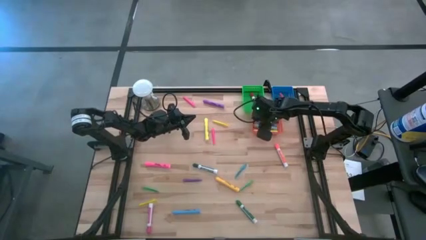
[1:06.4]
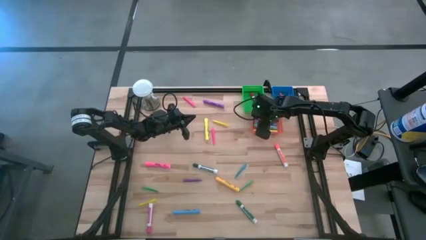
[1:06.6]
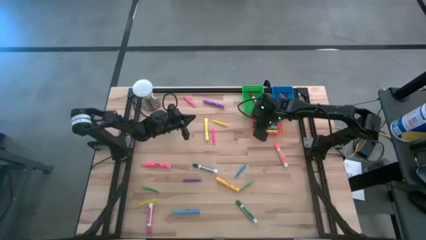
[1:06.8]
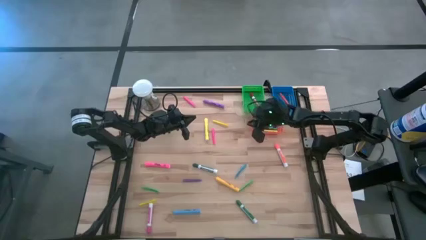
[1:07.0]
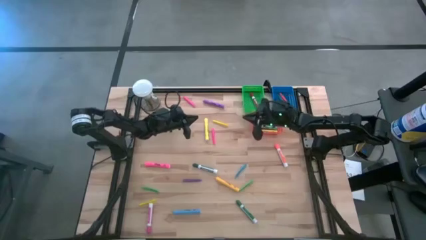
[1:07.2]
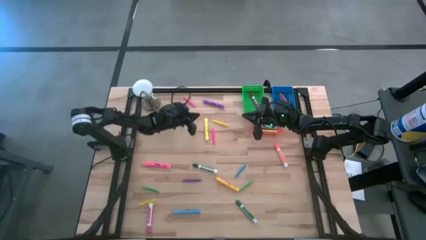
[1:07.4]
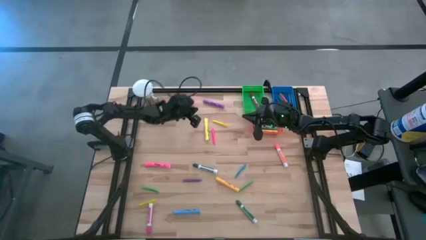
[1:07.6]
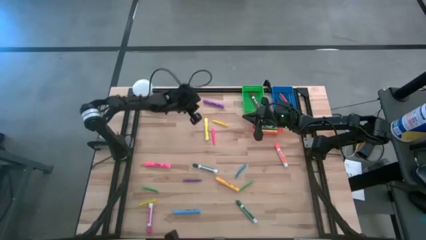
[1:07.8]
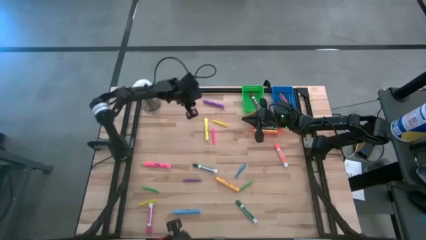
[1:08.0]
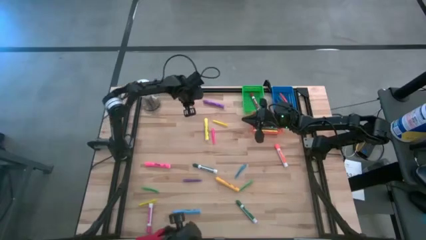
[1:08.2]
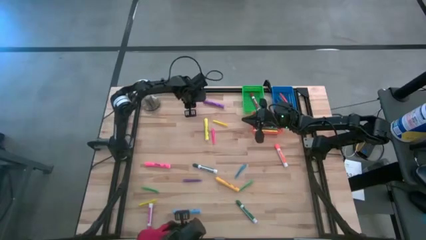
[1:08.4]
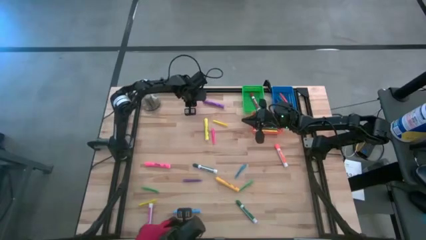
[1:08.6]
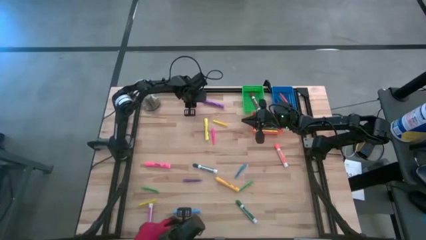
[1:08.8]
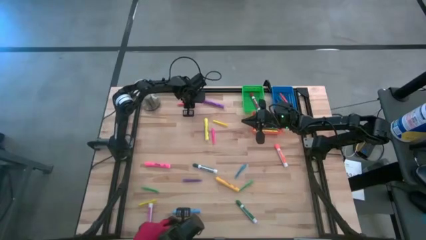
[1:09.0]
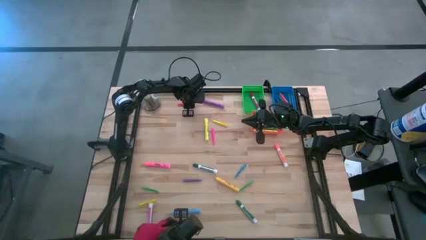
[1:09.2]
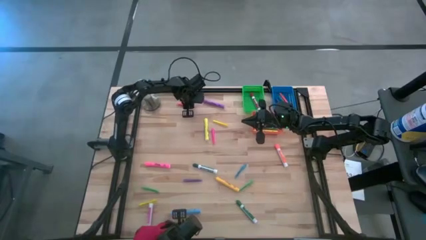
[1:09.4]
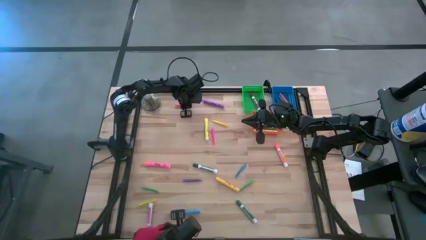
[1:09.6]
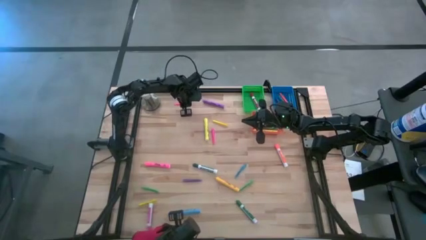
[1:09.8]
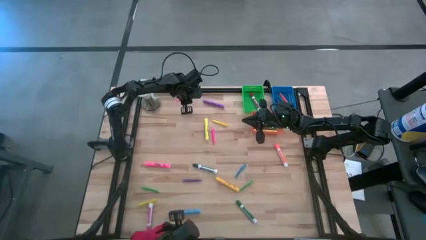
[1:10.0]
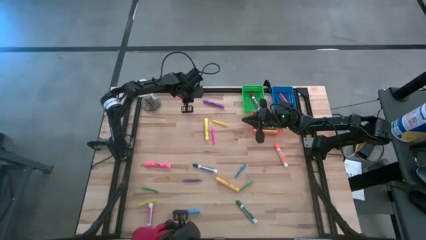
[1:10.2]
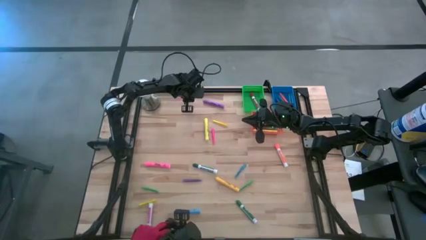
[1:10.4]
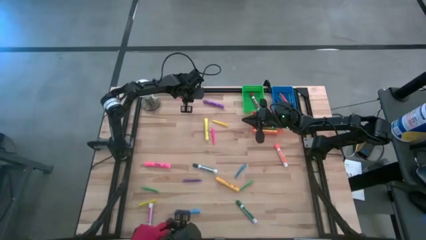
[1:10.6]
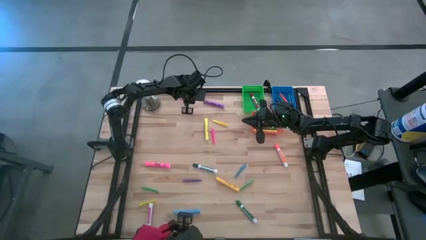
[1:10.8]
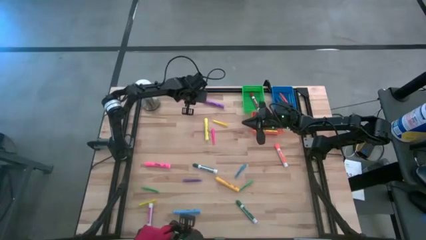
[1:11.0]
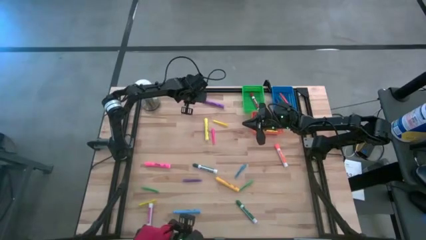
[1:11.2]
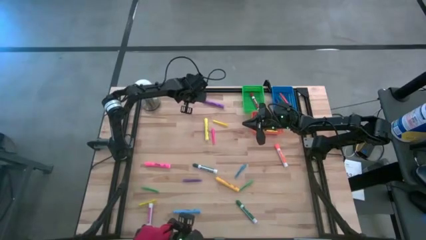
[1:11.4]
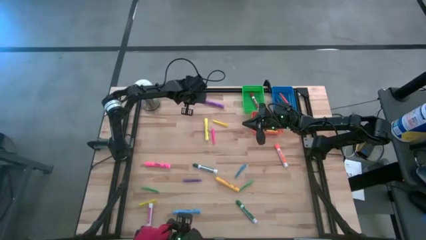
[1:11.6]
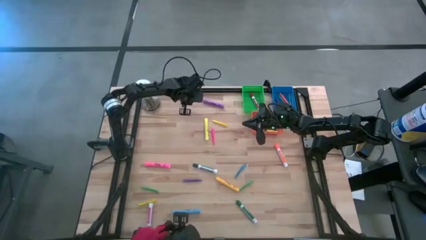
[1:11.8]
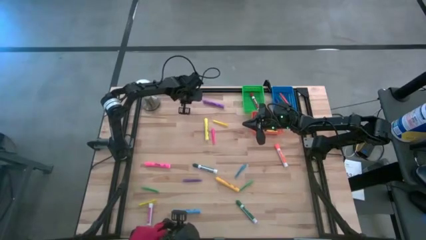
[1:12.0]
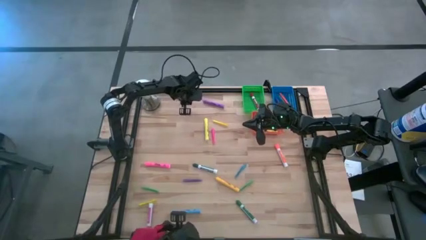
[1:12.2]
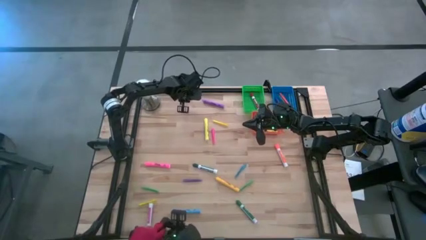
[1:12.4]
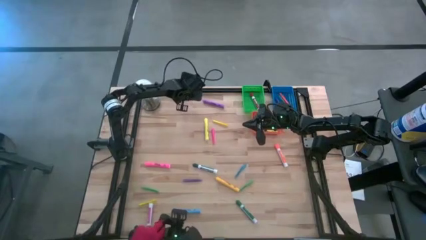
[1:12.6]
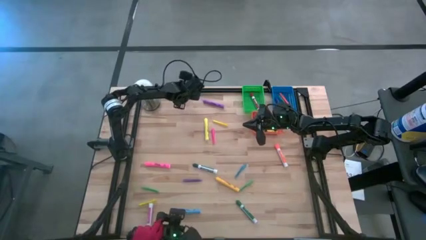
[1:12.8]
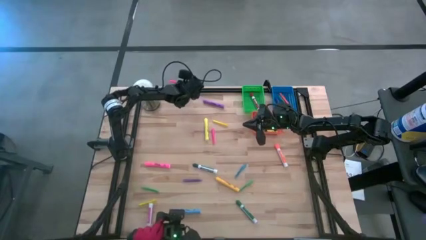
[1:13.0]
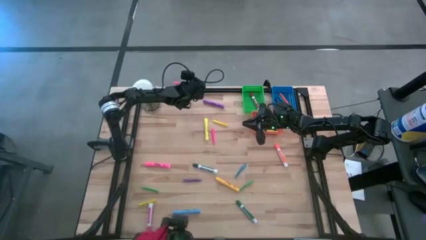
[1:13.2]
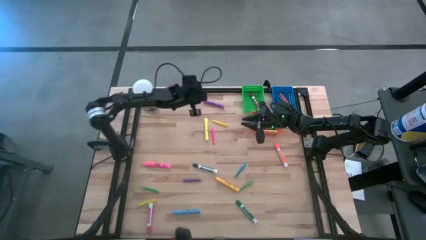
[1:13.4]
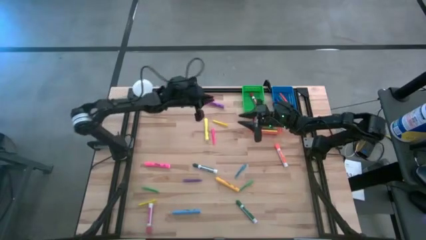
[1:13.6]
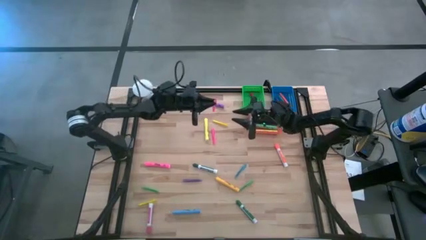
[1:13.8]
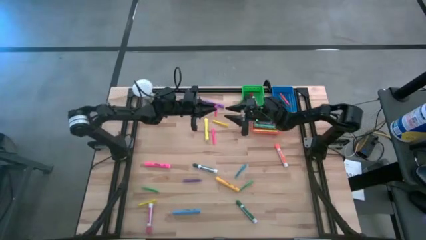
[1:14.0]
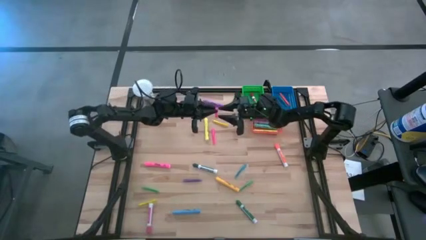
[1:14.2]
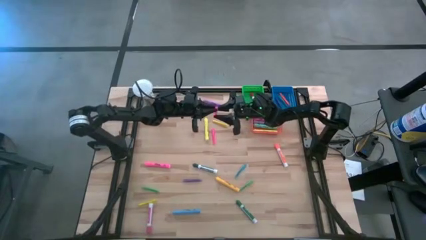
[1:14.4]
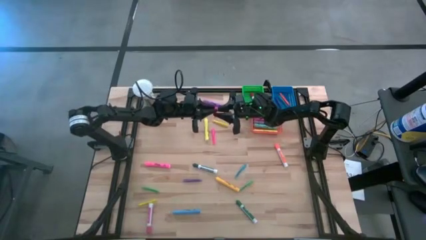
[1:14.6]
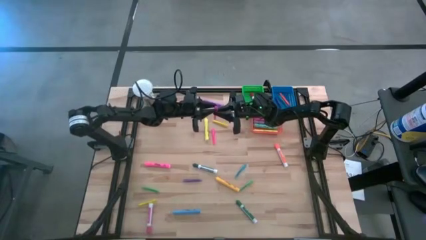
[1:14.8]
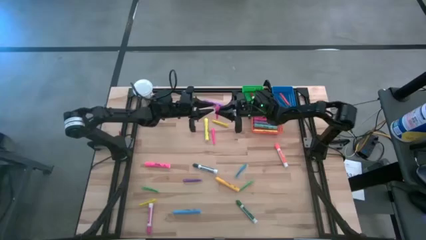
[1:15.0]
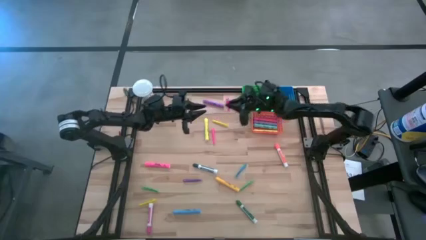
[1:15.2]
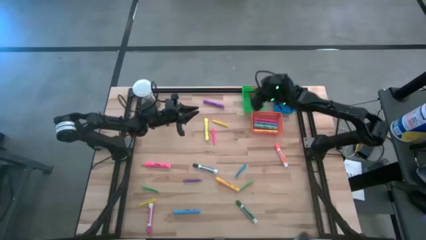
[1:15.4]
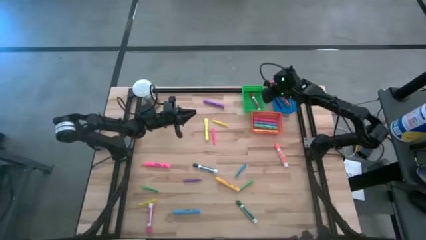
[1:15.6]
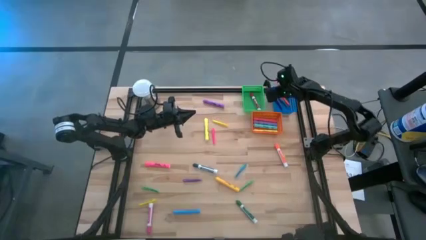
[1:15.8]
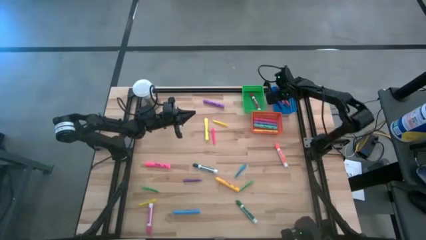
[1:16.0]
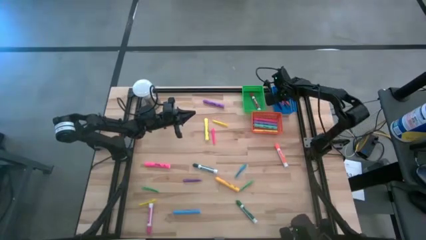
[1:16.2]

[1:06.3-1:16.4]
Task: Pick & Place Markers
Put the top left pink pen into the blue bin

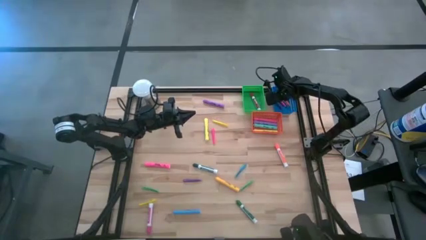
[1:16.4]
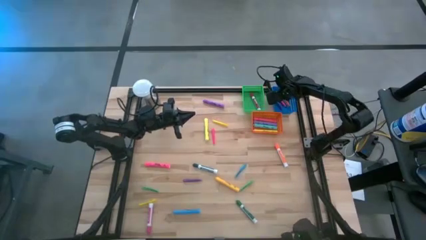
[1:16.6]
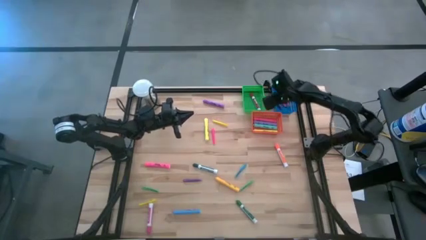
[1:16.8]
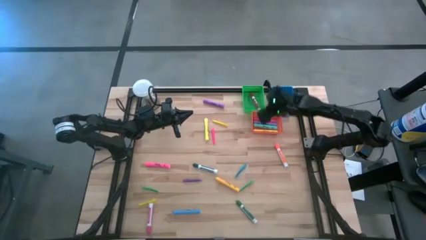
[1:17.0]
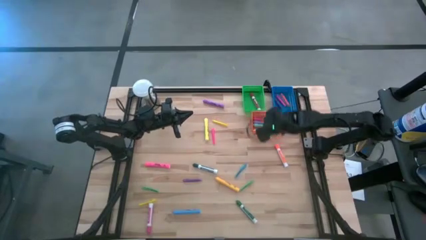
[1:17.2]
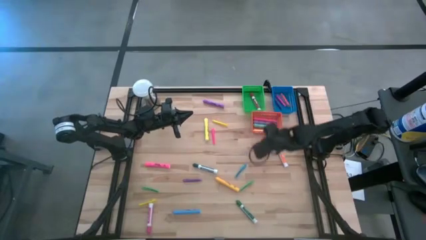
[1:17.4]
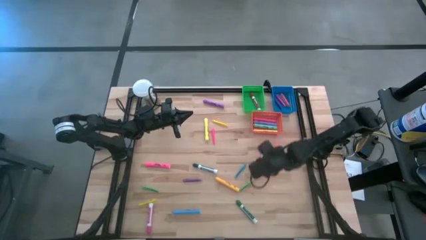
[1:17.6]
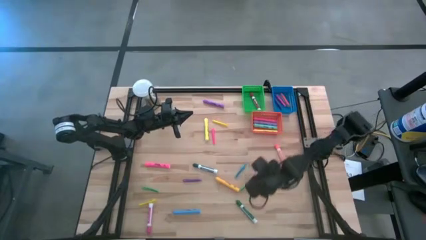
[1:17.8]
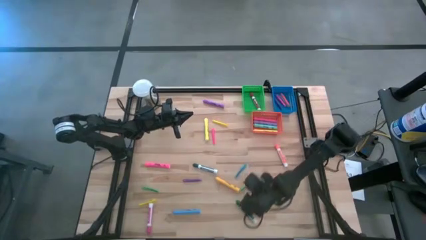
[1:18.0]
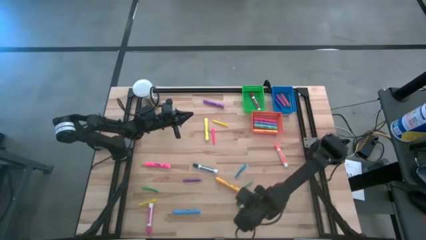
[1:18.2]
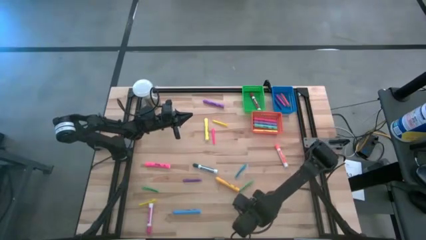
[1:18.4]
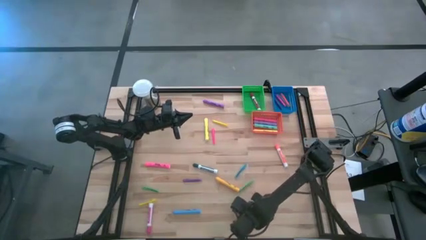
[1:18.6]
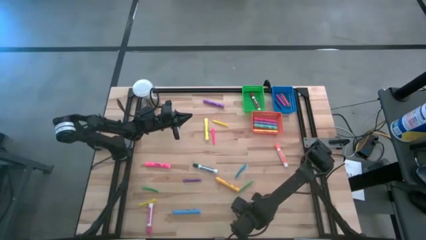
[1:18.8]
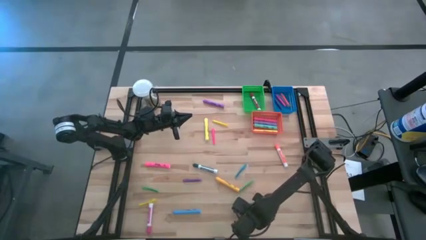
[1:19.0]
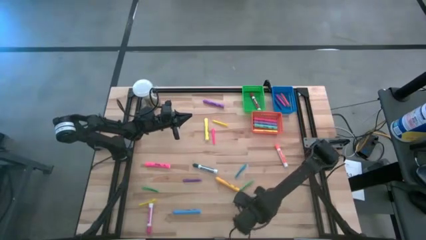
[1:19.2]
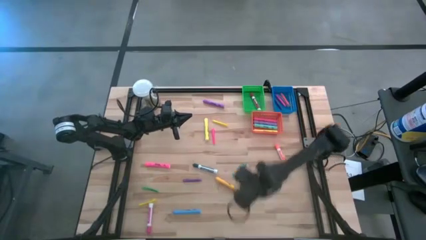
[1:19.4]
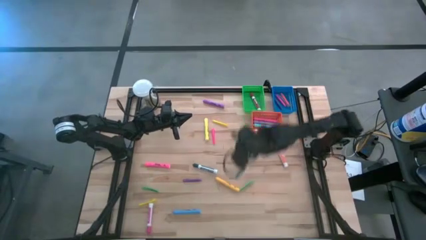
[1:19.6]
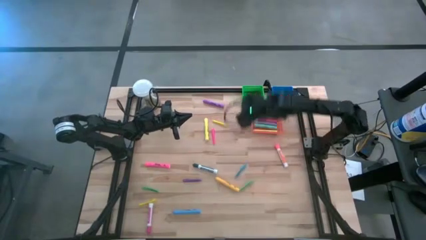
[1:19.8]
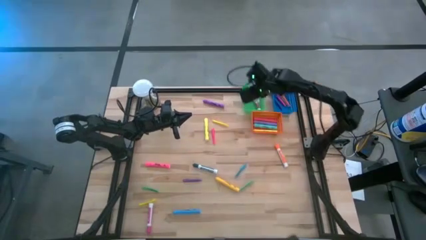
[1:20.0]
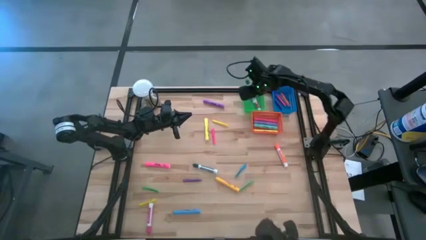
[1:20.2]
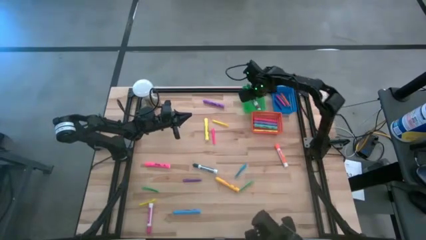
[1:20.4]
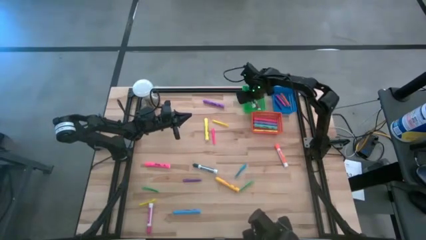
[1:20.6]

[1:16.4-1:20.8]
Put the bottom green marker pen into the green bin
